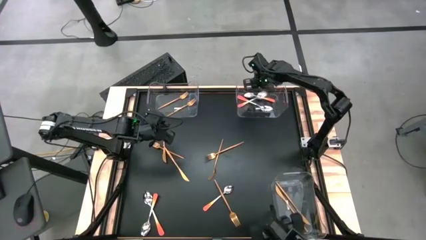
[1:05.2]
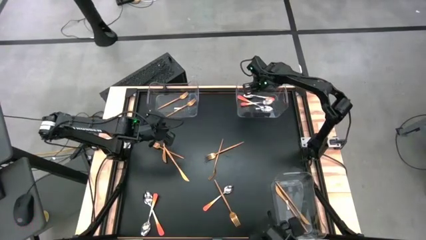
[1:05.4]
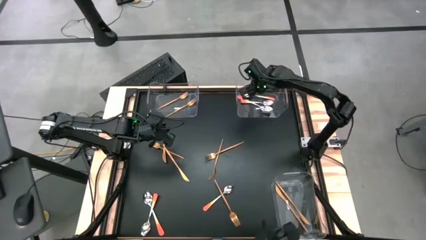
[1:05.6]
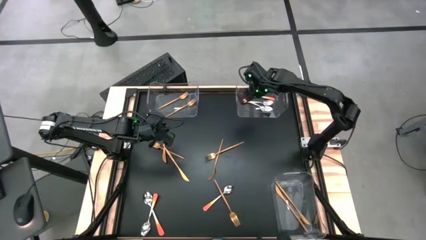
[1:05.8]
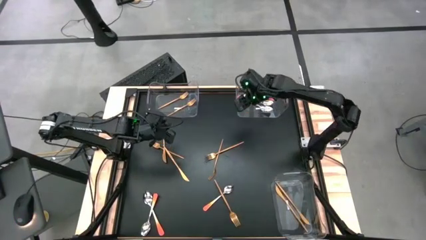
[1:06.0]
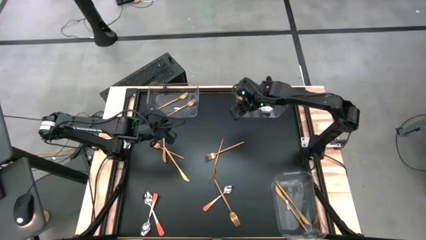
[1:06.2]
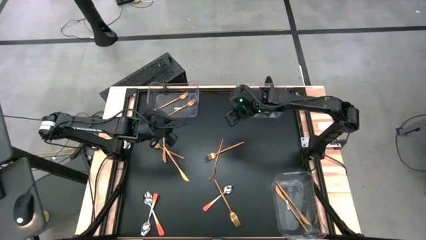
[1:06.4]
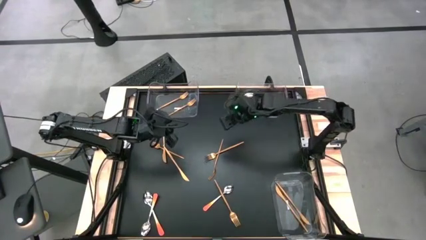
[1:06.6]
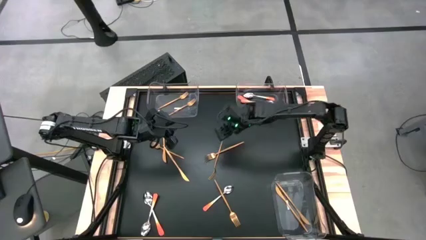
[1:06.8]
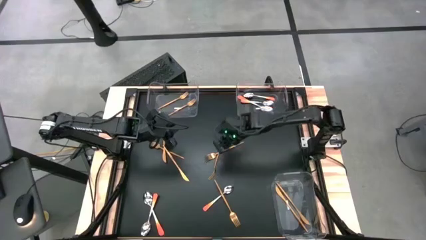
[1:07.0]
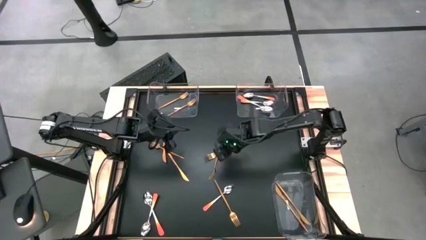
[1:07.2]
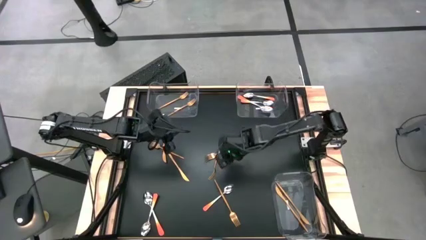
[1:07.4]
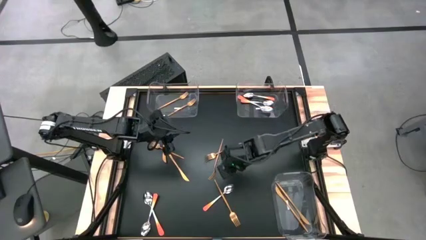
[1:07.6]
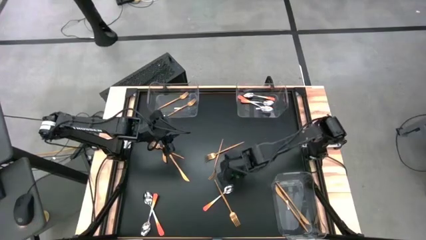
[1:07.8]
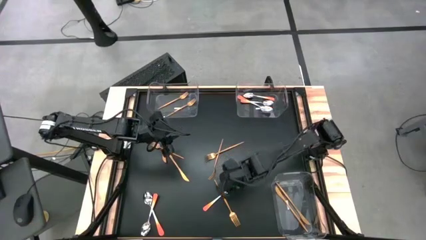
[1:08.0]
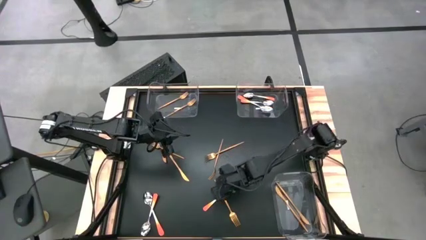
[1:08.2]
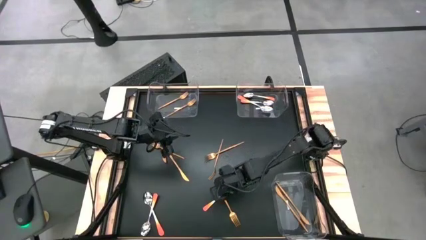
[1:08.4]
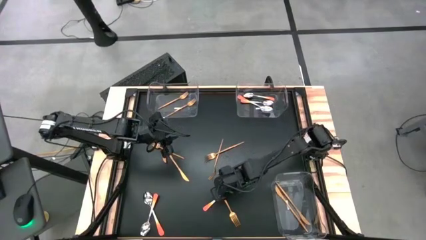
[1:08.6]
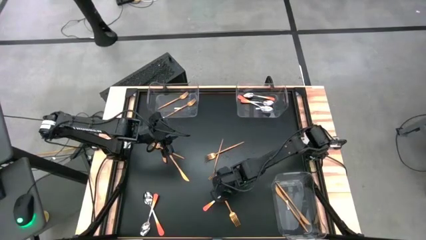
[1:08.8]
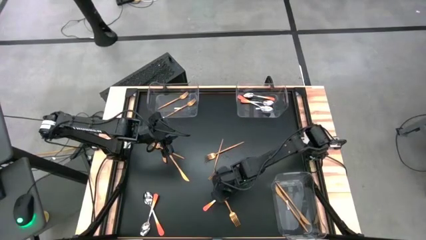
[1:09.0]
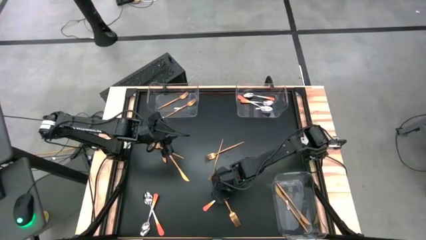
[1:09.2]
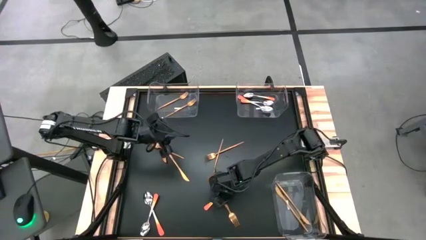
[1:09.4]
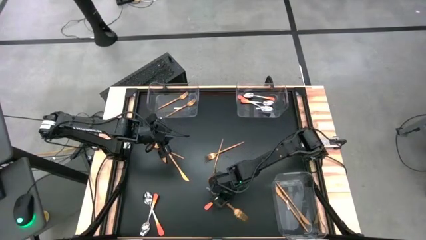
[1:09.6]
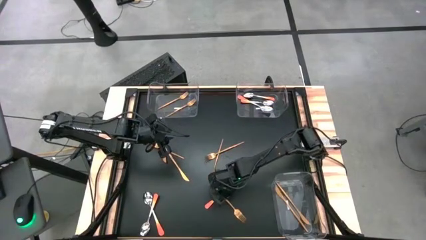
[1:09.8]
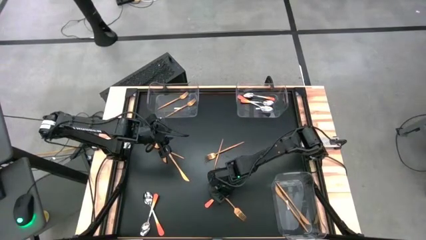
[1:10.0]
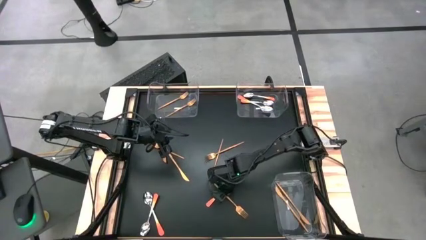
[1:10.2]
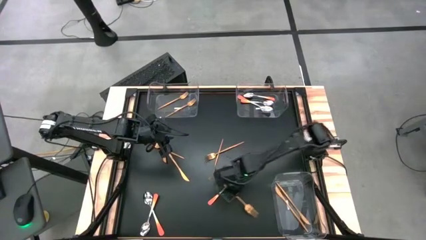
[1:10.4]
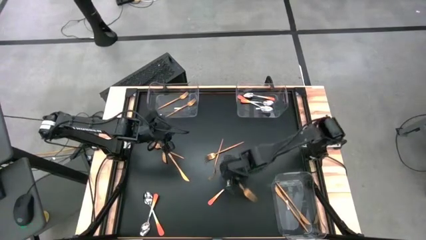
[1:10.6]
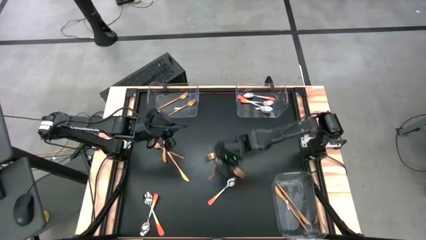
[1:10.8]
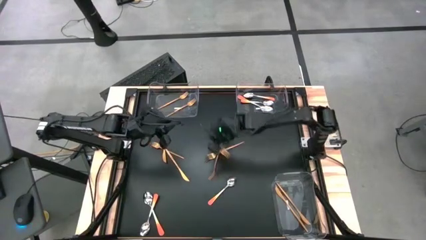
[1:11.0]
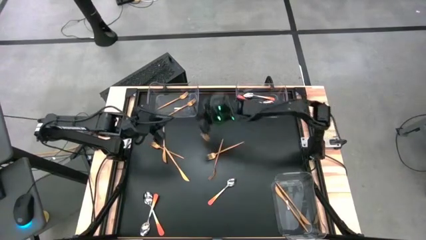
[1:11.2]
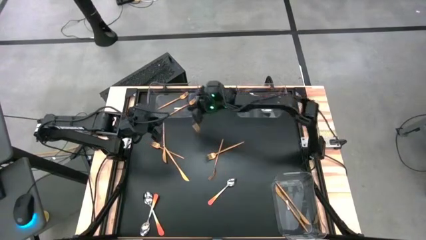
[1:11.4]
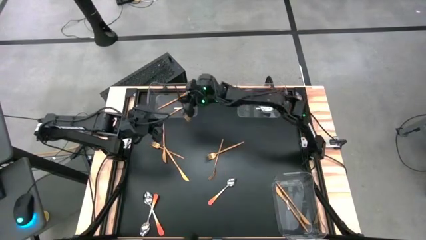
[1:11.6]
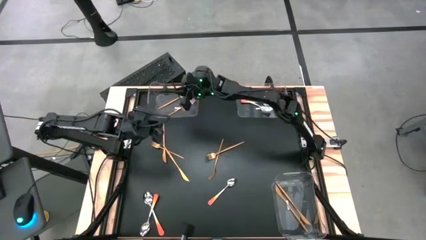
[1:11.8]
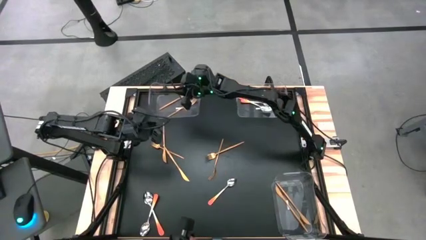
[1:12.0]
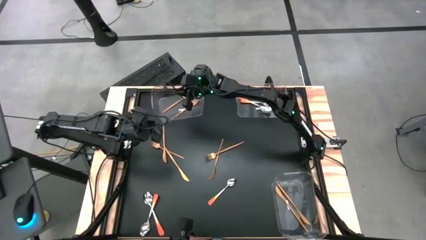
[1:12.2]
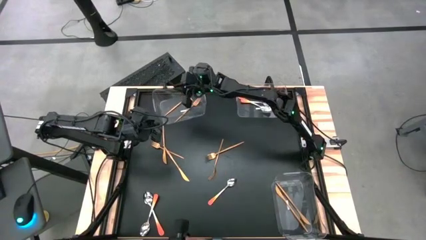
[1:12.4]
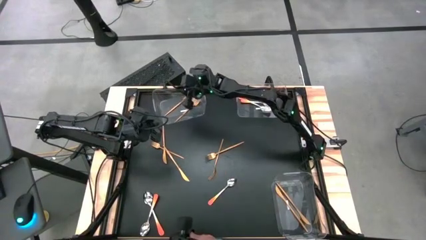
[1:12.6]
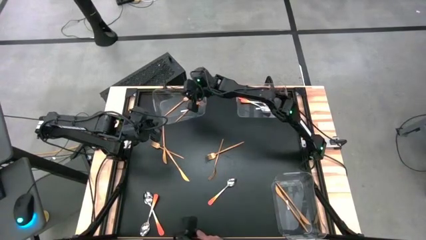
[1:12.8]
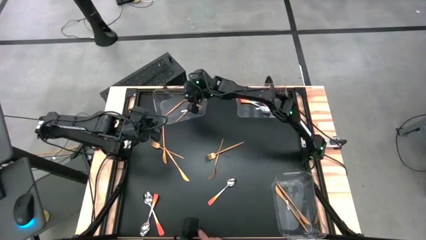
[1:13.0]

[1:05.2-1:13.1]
Task: Sort silverware by color (type)
Put the gold fork into the top left transparent bin

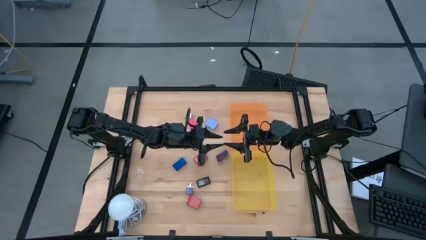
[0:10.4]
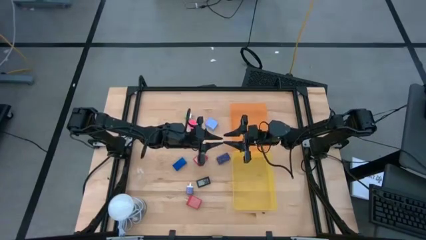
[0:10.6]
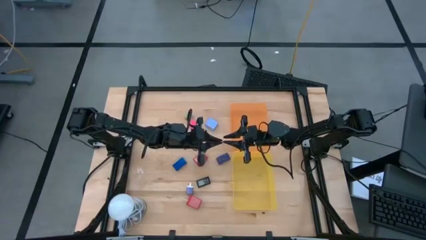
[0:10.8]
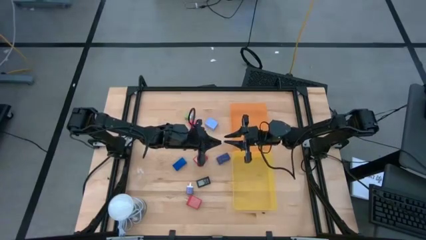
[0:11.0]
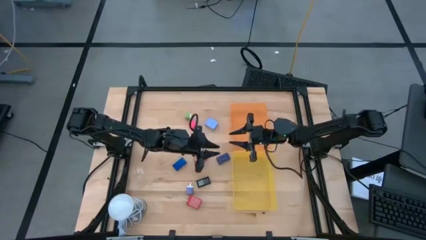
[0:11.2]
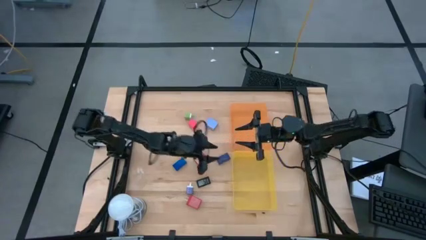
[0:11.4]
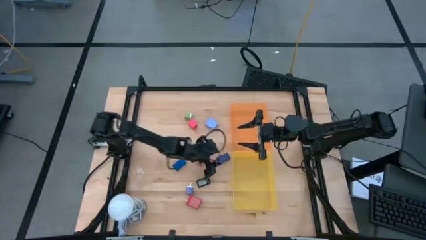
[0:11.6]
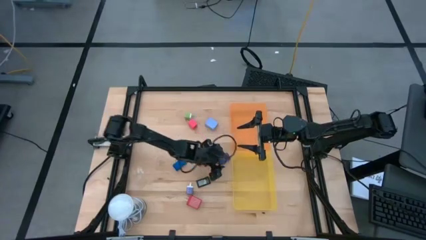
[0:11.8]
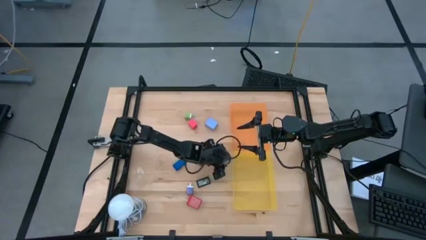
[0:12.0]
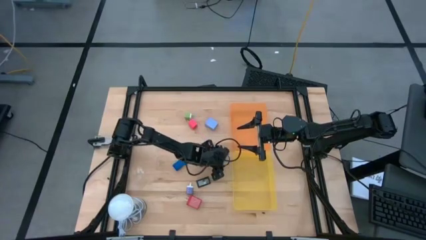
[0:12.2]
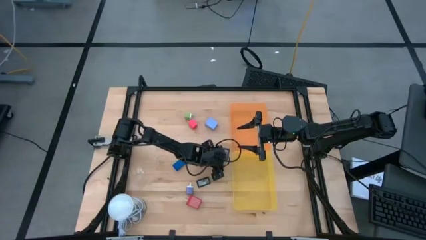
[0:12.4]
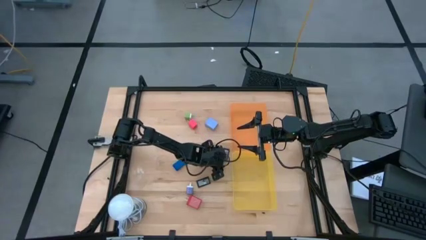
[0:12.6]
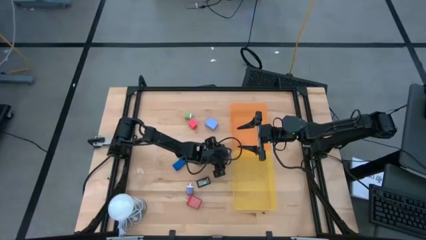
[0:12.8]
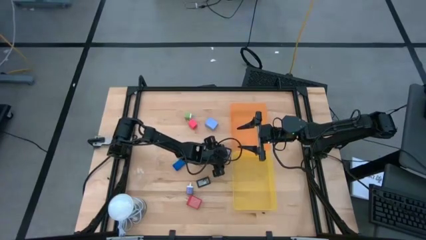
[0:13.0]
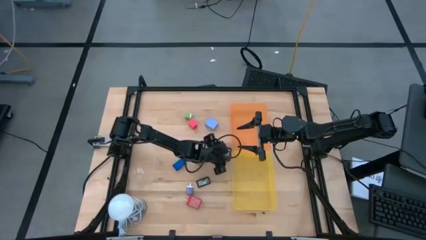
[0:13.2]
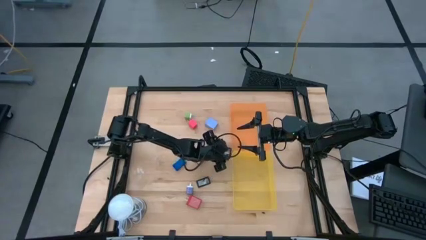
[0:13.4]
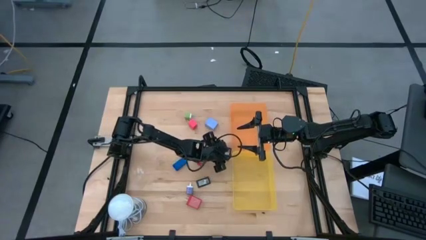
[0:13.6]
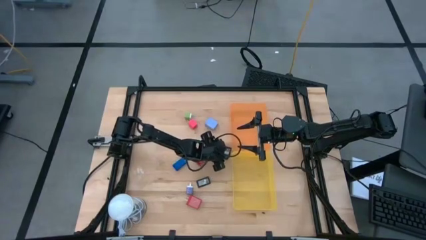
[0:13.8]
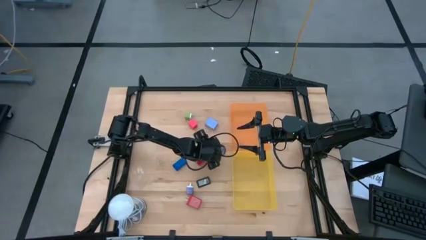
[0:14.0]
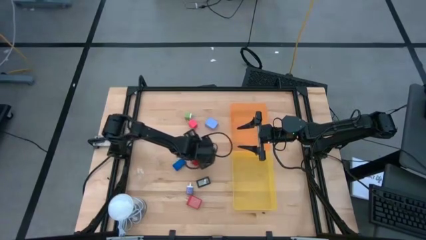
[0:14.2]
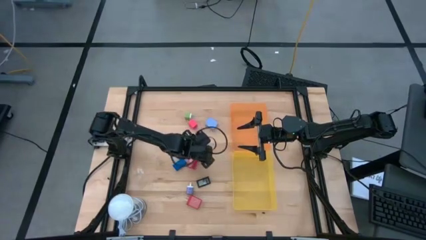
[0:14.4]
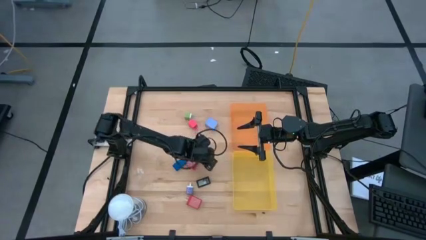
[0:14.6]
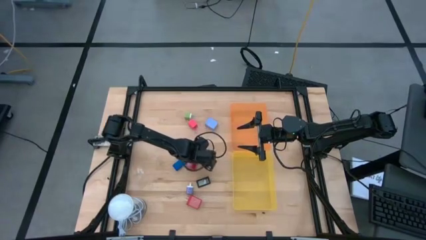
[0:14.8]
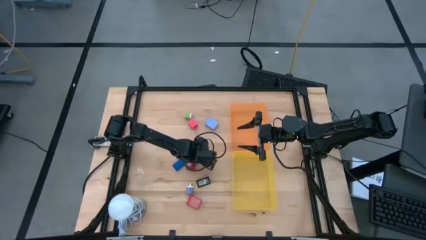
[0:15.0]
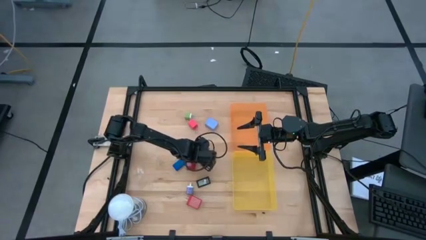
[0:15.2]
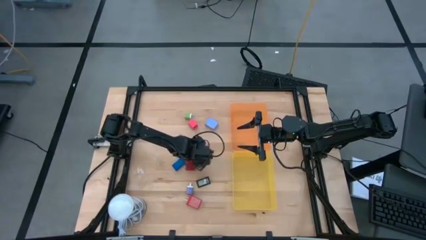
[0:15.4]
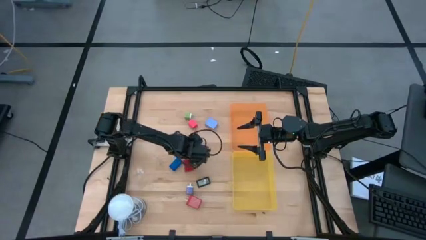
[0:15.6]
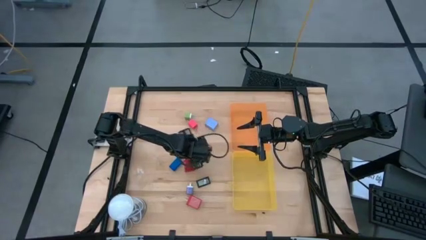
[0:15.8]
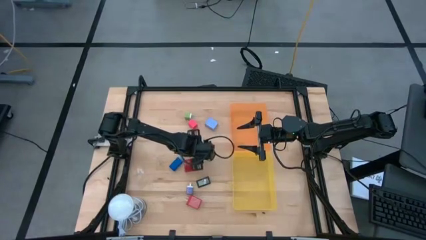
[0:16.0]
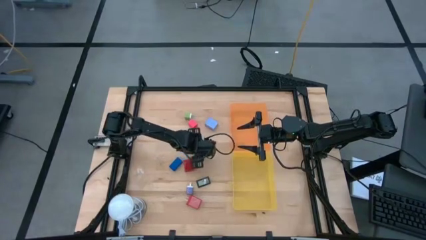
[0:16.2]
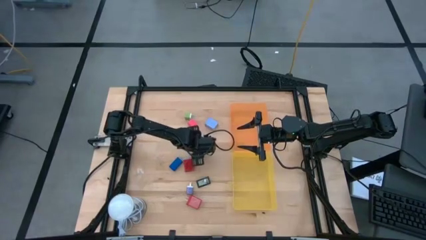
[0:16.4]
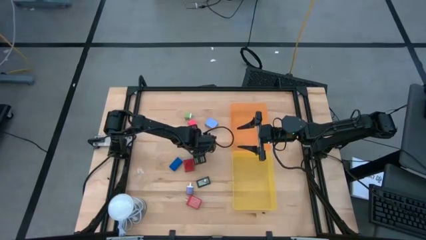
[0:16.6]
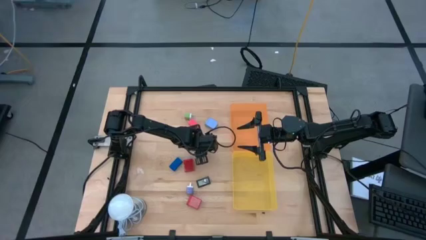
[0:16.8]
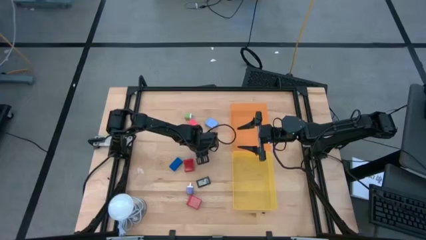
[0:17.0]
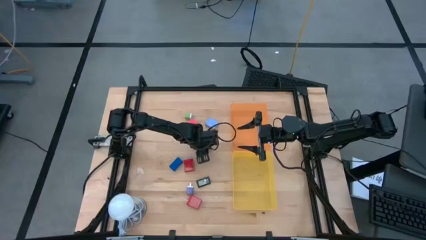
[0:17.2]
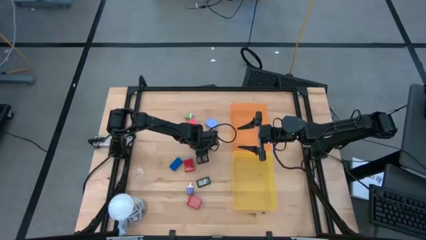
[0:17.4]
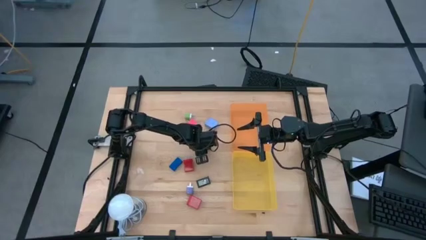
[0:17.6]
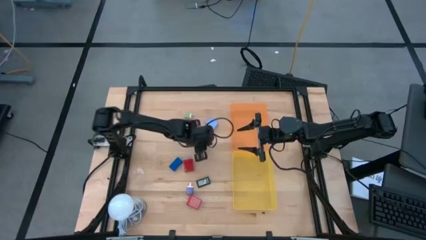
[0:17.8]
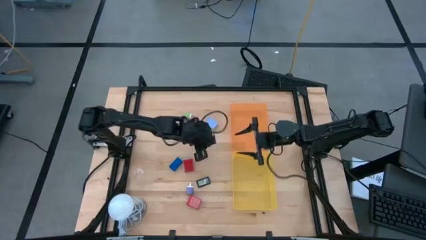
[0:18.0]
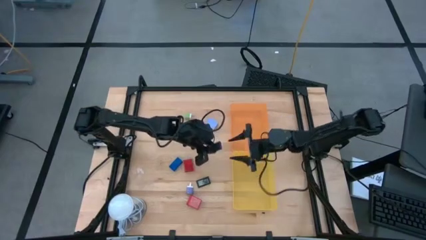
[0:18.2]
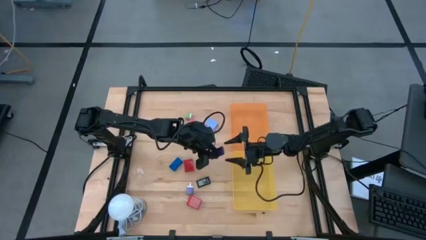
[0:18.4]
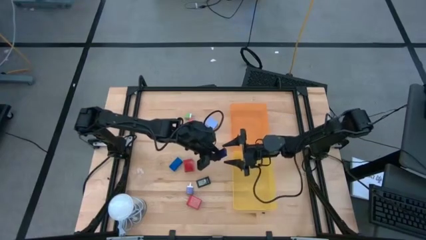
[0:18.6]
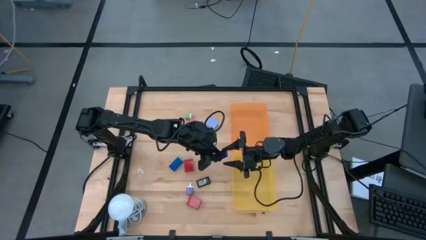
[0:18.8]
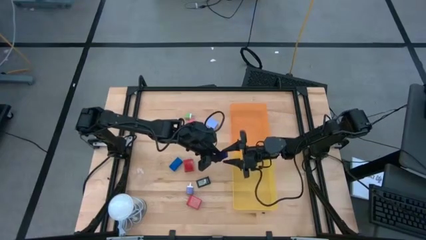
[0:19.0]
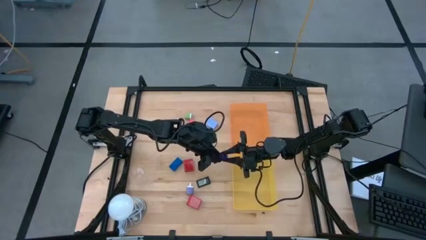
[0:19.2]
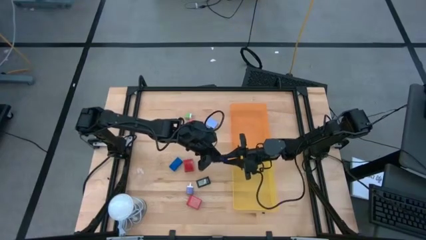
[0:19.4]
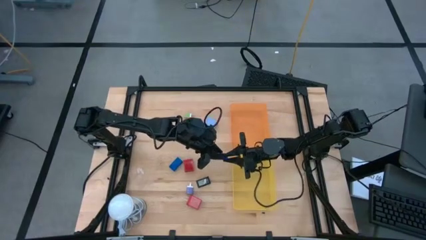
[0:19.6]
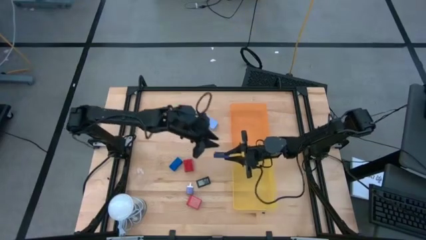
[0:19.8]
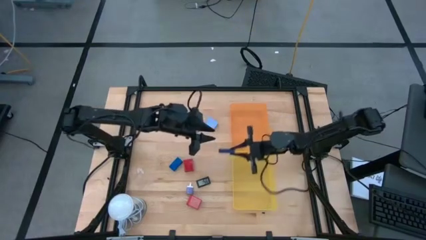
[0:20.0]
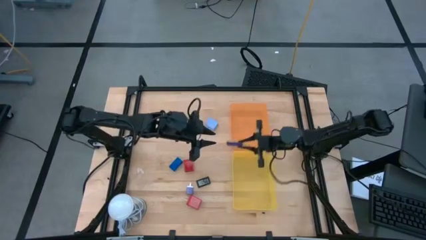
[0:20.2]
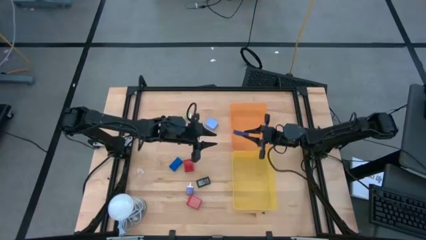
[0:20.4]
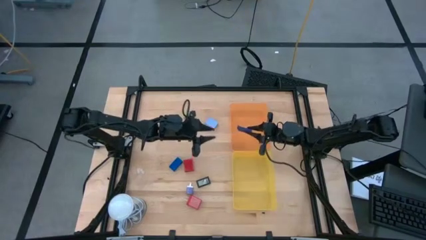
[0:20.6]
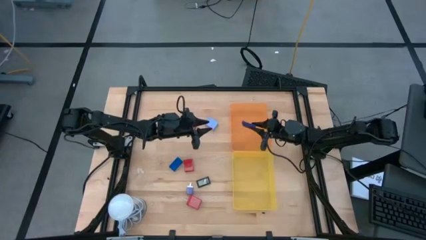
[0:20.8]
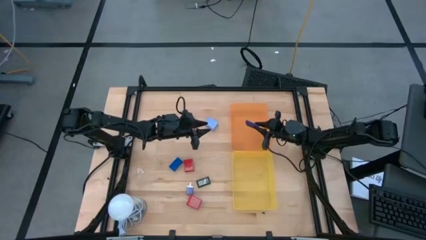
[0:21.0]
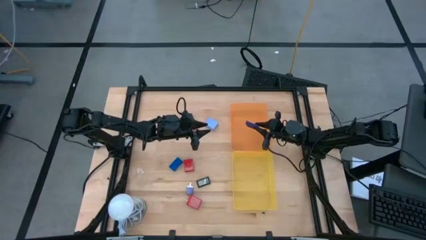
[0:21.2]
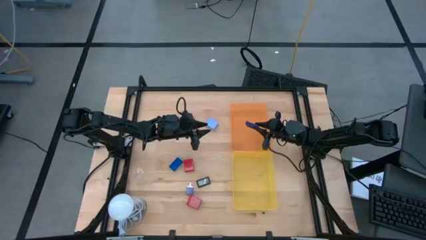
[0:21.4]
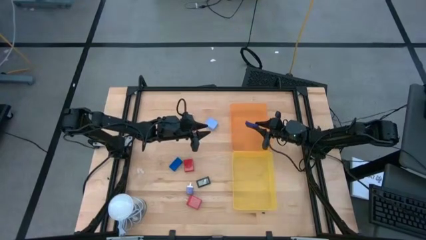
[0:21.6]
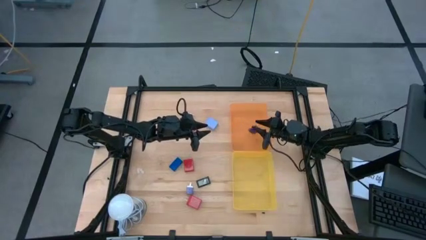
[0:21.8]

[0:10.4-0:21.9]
Task: Pick & Place Office items
Put the dark blue timer into the orange bin
